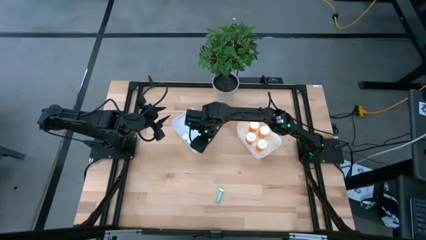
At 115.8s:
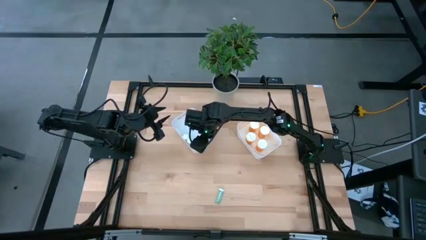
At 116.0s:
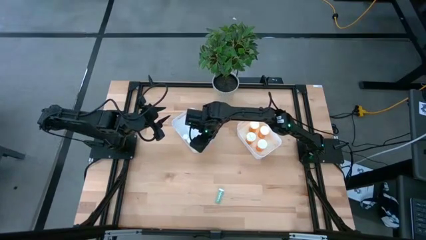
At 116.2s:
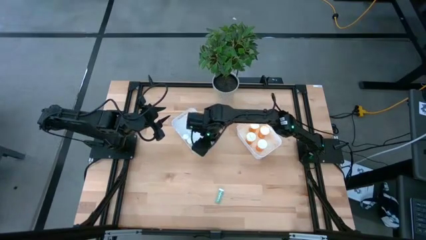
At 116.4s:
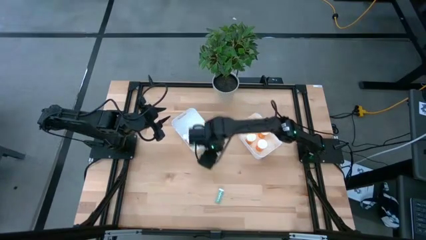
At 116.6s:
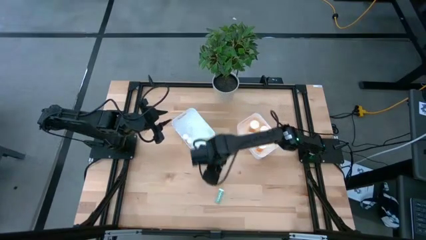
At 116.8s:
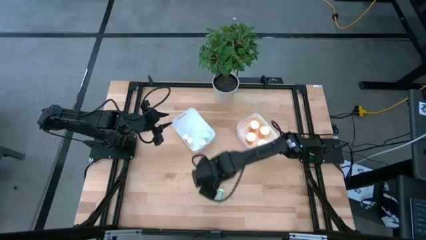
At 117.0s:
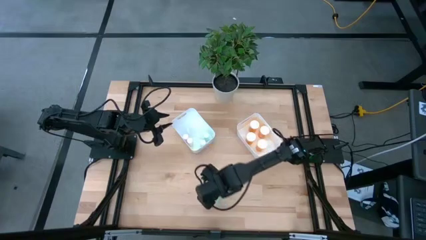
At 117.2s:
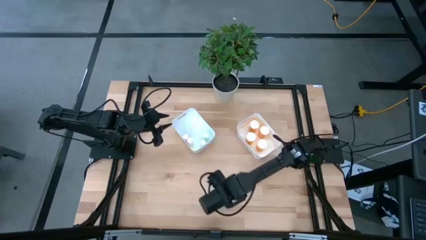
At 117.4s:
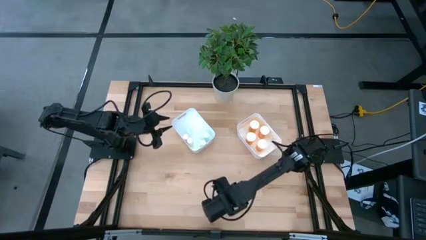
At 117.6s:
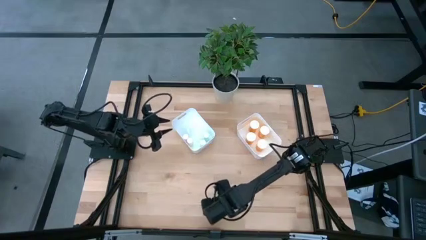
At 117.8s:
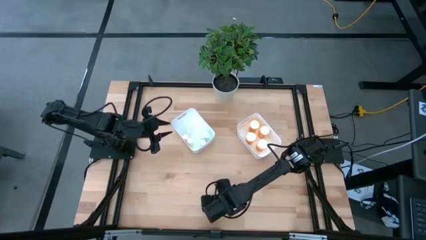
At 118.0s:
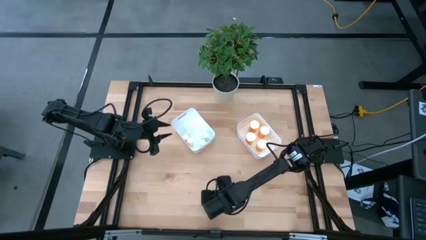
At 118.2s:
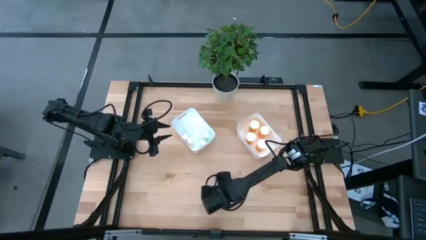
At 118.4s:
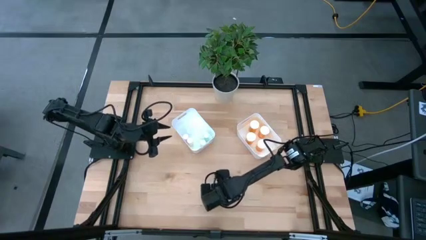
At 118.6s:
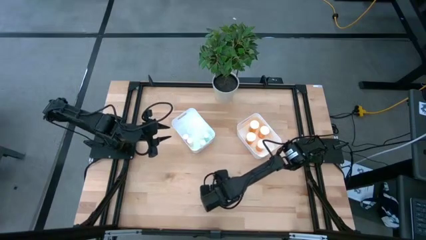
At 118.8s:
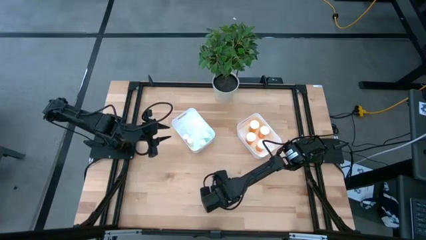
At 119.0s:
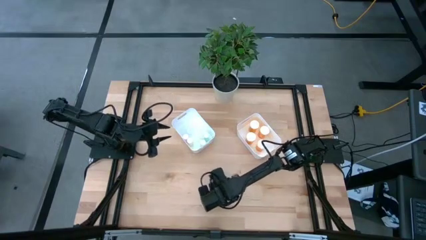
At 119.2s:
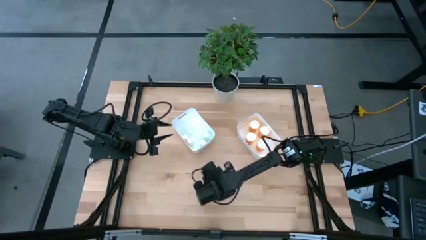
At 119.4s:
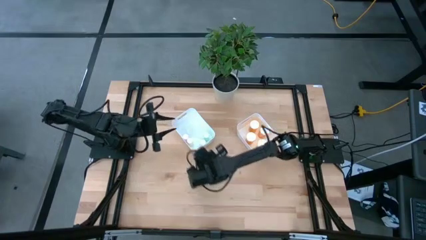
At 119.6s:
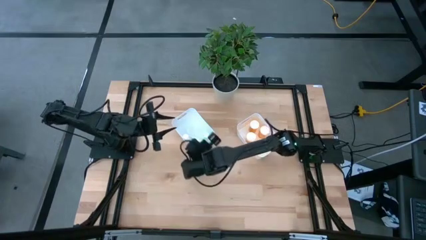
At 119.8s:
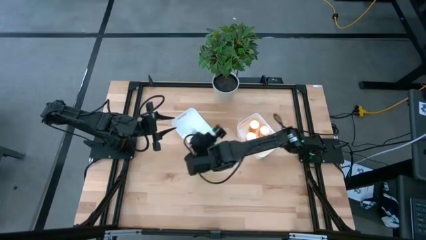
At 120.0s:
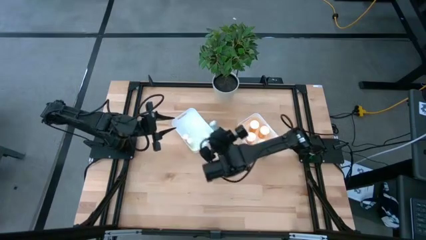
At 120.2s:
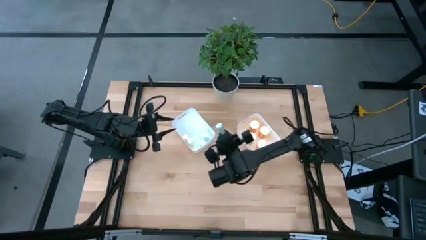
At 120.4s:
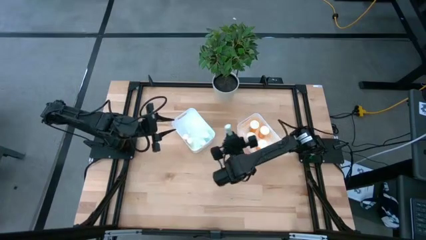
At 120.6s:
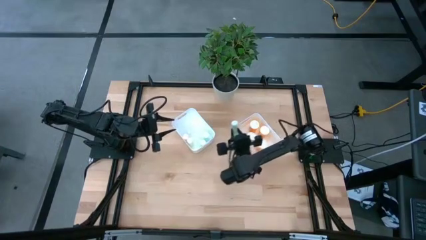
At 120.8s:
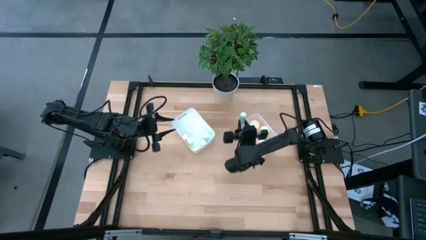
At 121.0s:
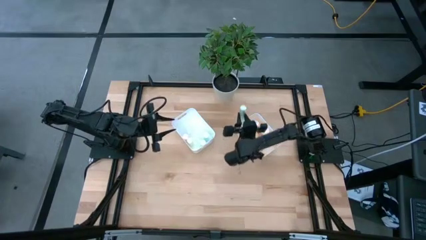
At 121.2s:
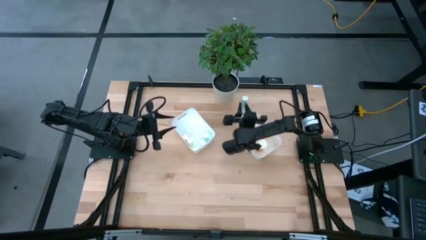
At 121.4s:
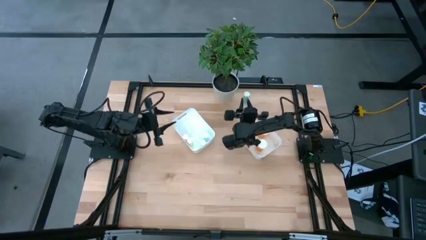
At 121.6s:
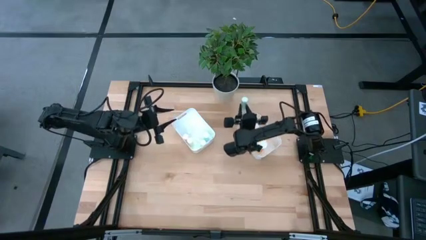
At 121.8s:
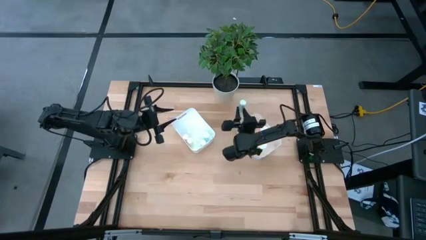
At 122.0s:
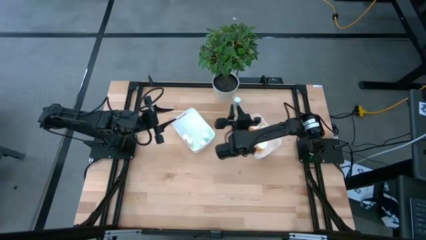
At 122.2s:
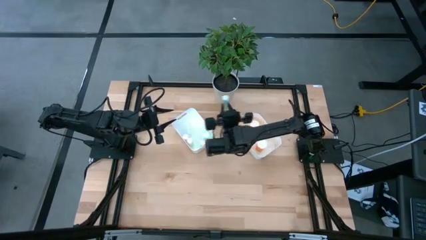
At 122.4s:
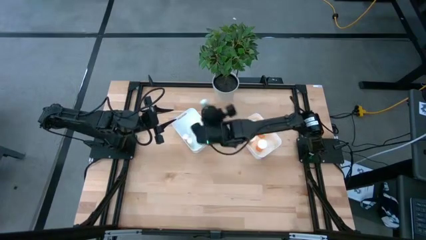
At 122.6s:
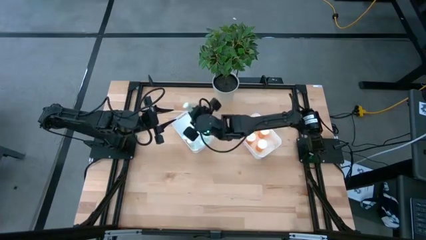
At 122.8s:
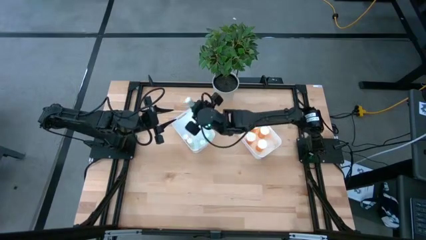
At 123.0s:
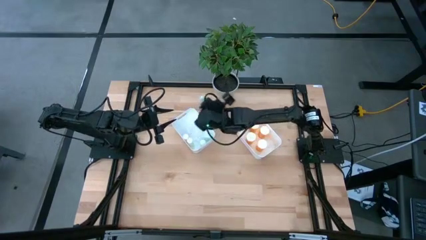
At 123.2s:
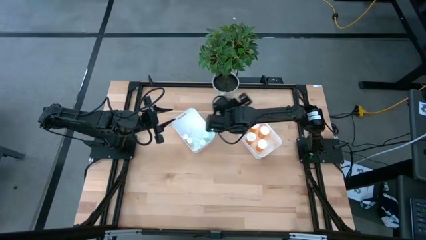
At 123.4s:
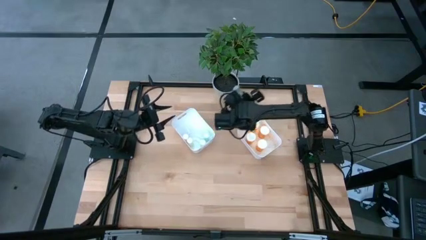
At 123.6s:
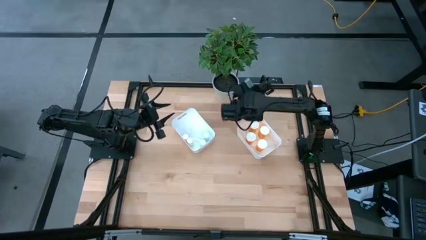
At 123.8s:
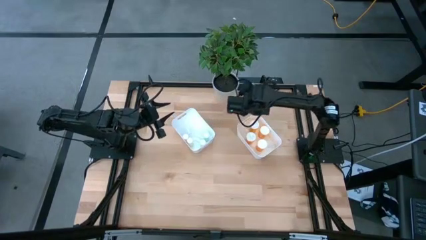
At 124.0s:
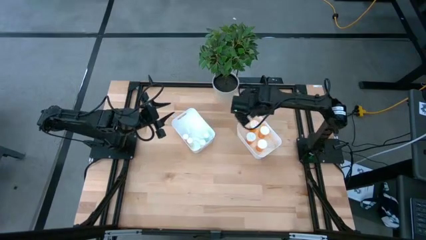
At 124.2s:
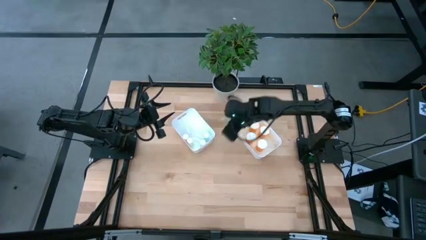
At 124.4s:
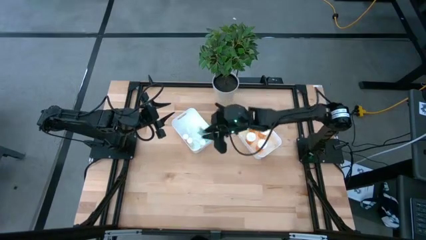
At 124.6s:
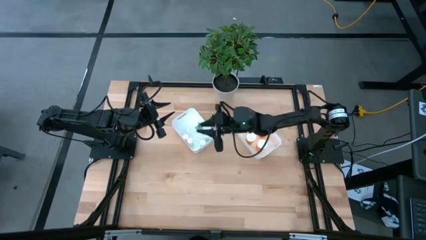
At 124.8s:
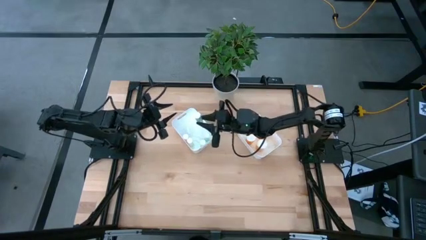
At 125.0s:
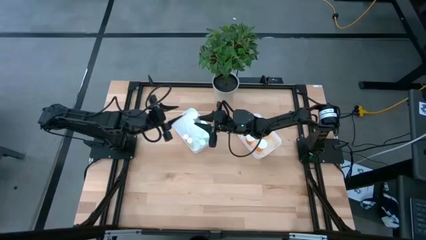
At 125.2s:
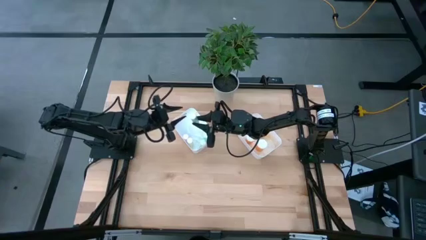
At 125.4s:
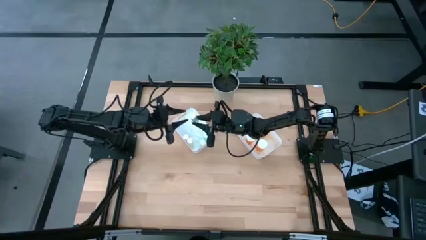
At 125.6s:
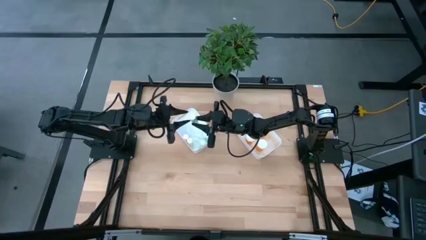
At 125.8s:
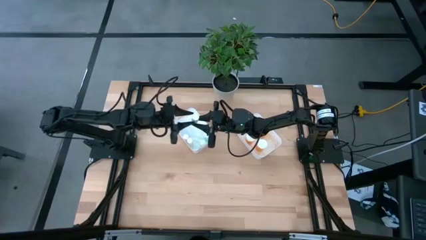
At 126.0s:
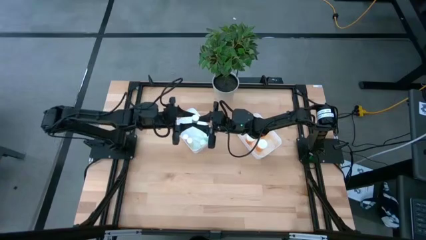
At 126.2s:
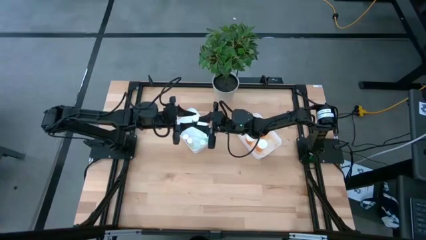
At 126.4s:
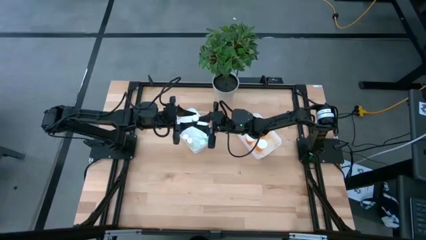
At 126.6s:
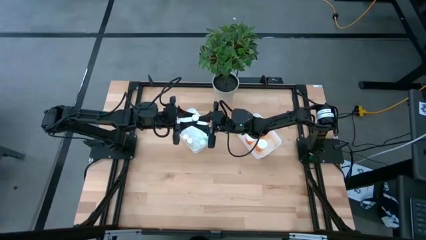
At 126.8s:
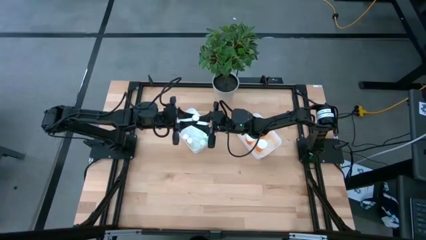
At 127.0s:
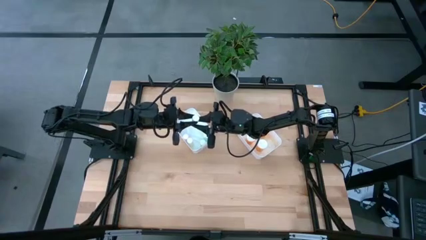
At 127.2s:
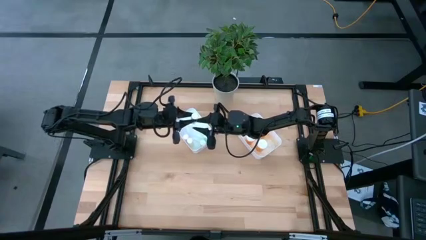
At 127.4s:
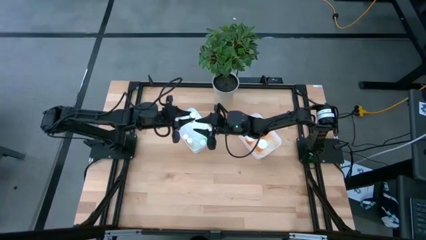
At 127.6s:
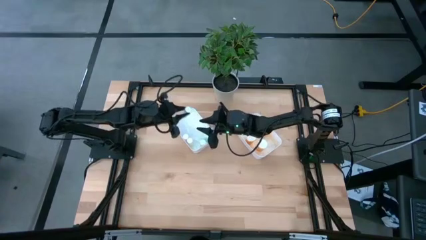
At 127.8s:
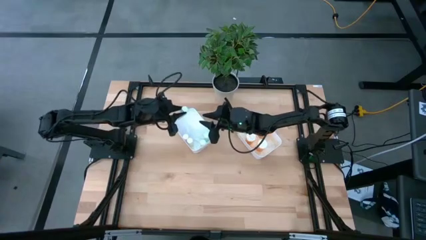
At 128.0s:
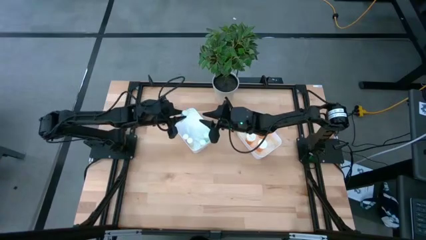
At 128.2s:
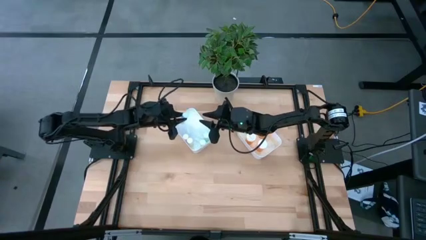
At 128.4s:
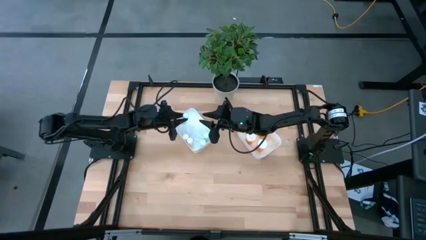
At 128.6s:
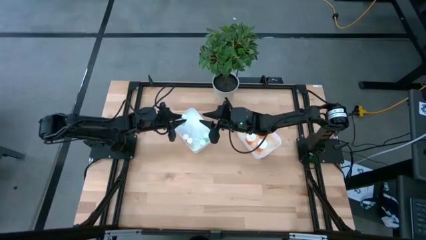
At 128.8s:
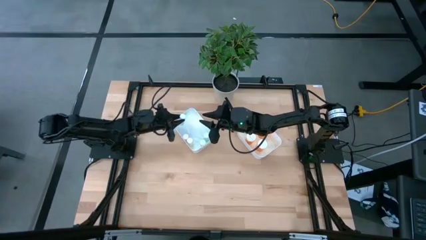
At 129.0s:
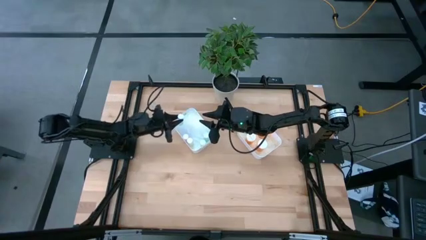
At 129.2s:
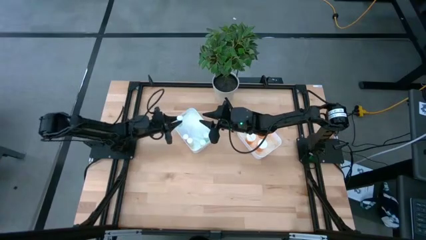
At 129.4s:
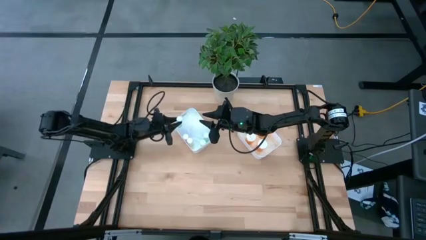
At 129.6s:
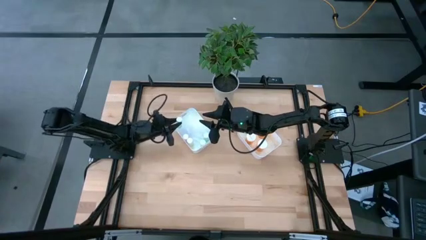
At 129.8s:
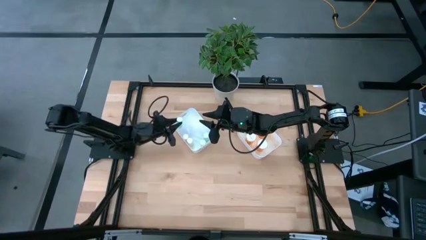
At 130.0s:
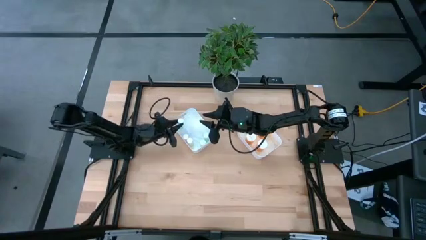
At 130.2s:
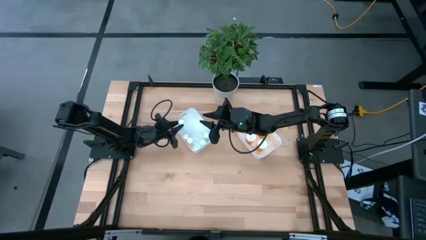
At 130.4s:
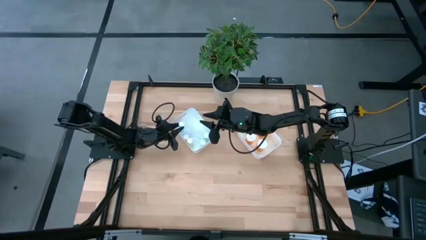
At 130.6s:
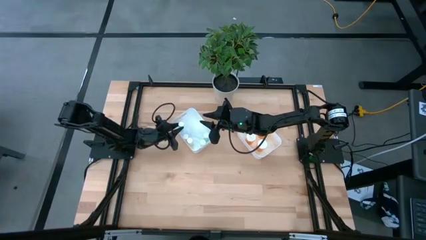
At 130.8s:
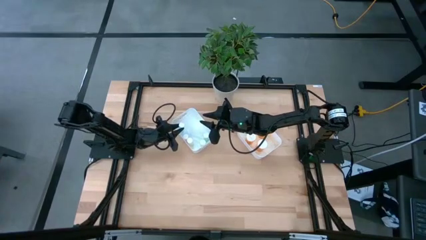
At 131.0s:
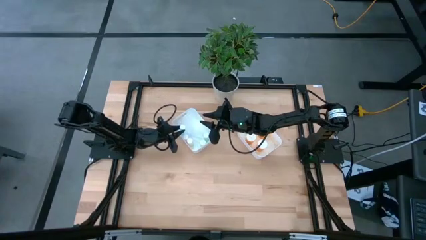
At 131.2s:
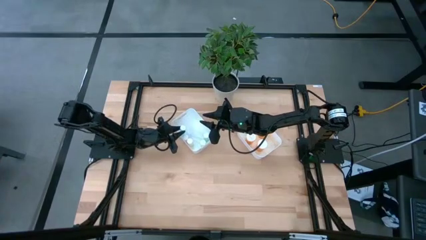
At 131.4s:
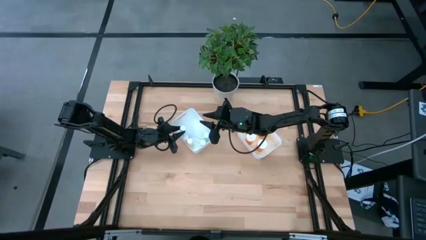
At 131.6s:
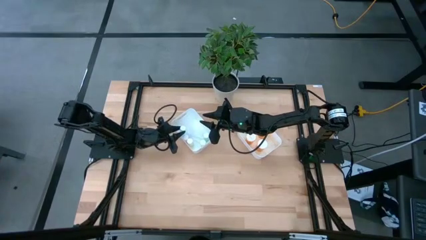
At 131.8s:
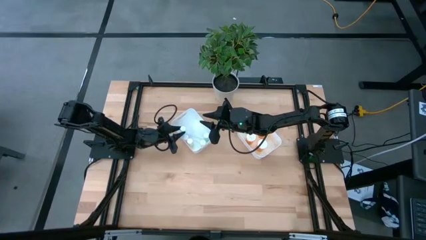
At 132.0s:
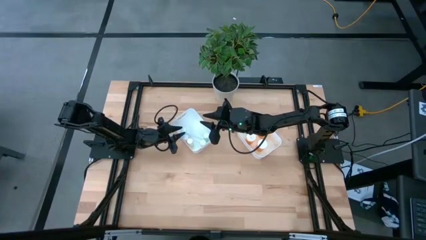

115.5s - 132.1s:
Task: Pick and place medicine bottles into bin by pill shape (circle, oval)
Put the blue pill bottle into the left white bin

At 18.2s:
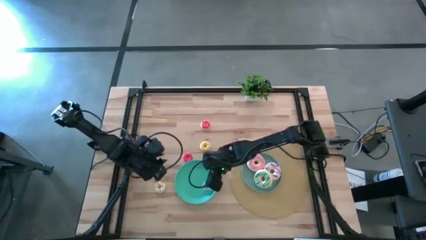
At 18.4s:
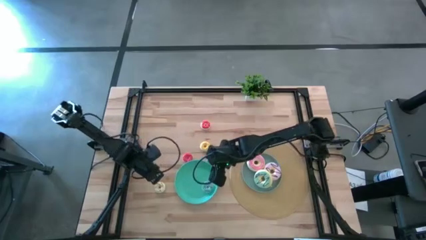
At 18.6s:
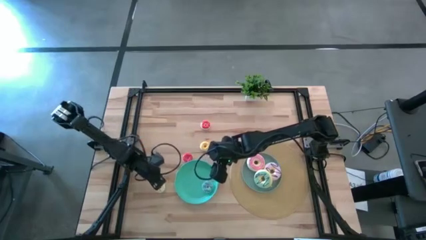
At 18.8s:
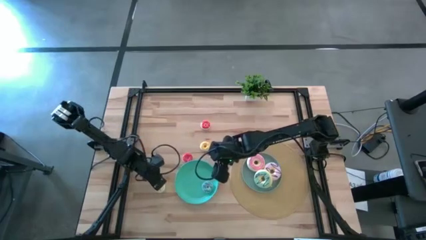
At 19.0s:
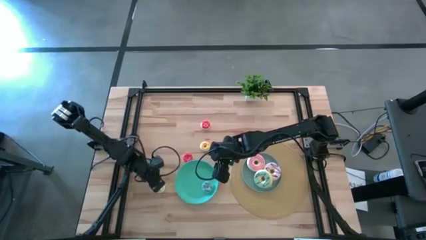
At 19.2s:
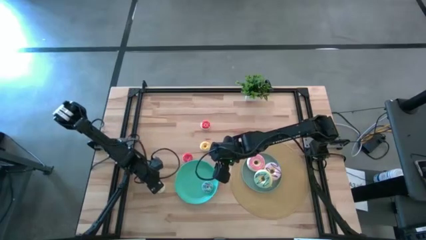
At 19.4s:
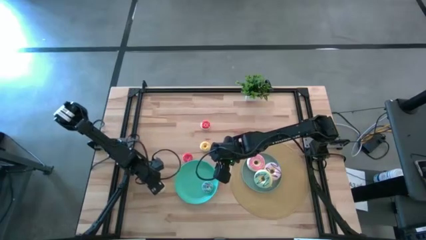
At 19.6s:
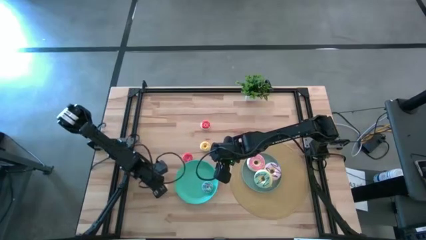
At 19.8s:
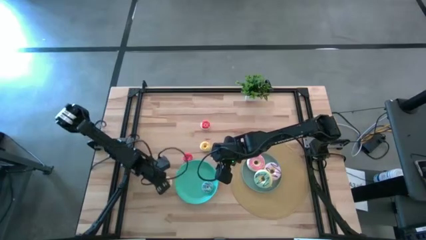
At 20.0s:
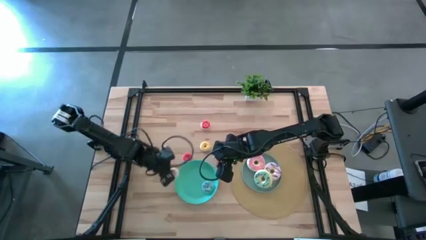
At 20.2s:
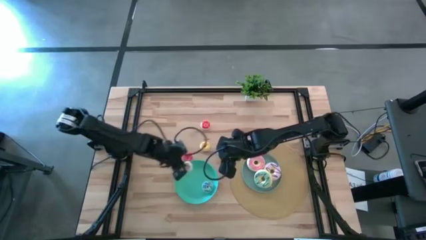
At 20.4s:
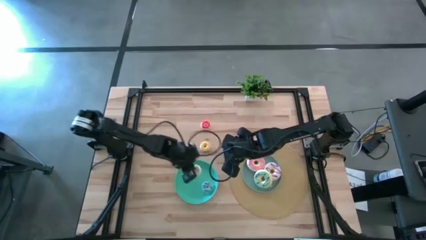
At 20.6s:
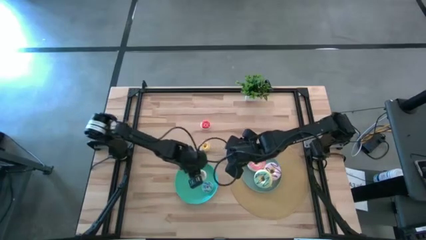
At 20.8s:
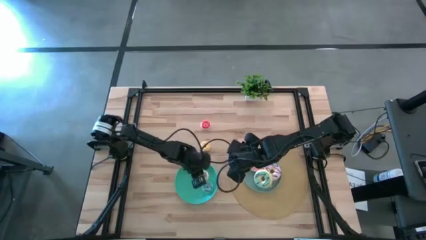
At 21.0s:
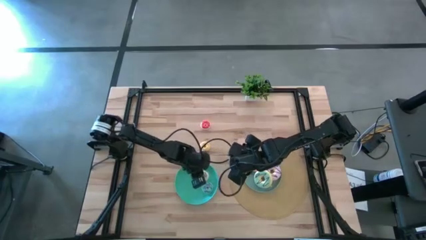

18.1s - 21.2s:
Task: Pick & Place donuts
Put the small white donut on the green plate
